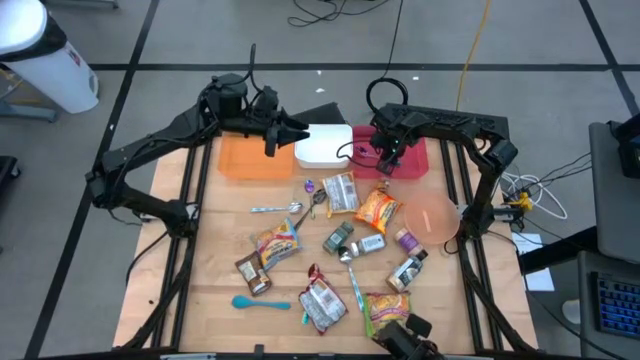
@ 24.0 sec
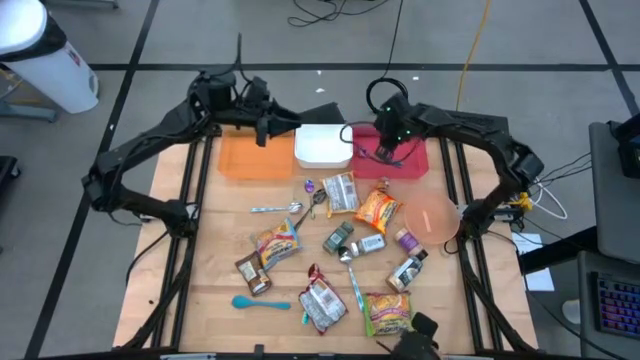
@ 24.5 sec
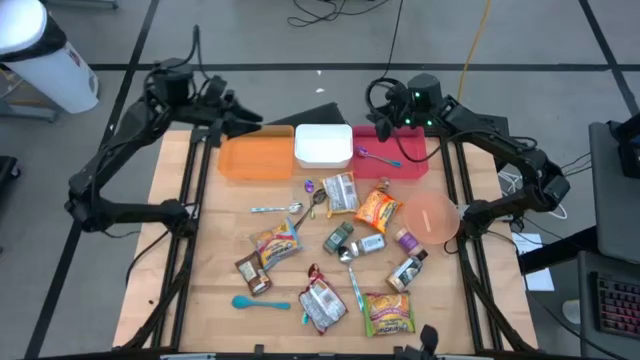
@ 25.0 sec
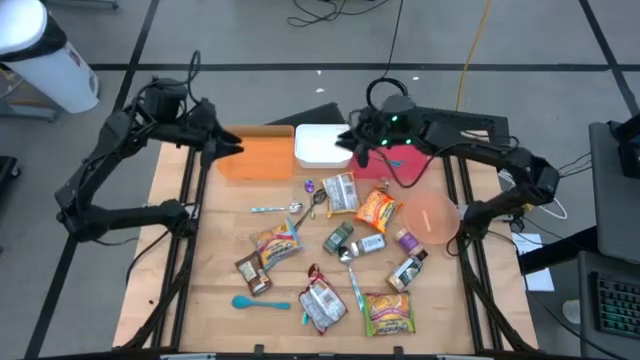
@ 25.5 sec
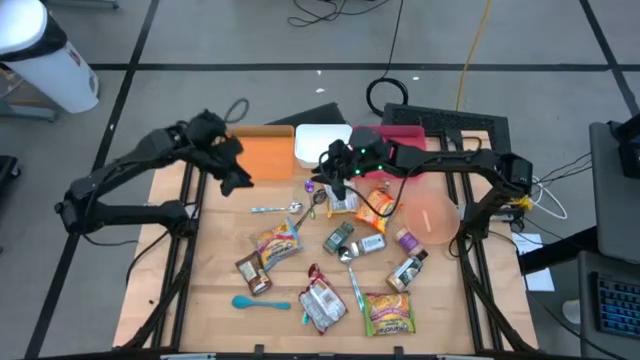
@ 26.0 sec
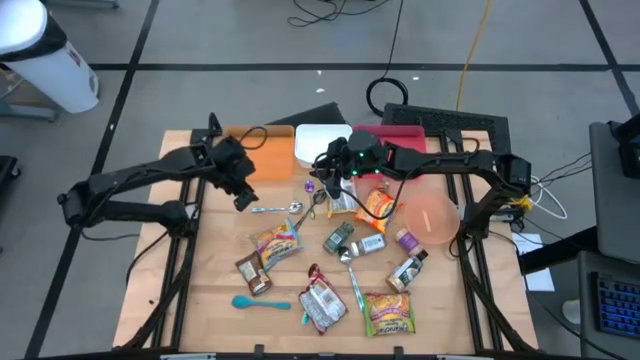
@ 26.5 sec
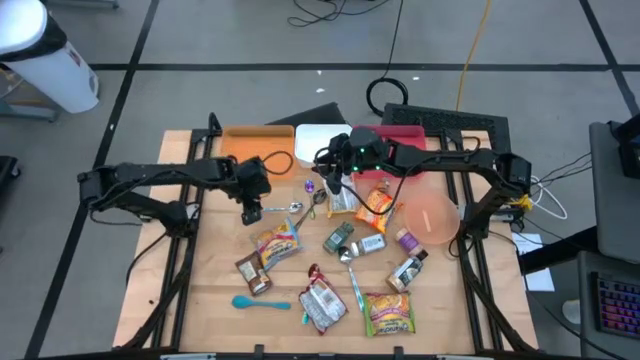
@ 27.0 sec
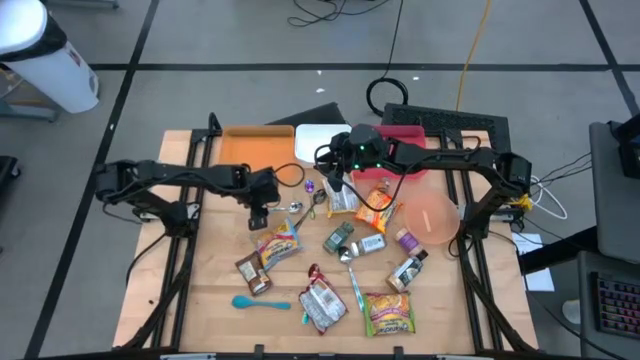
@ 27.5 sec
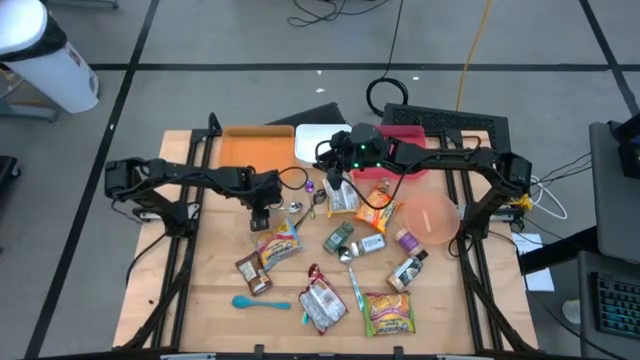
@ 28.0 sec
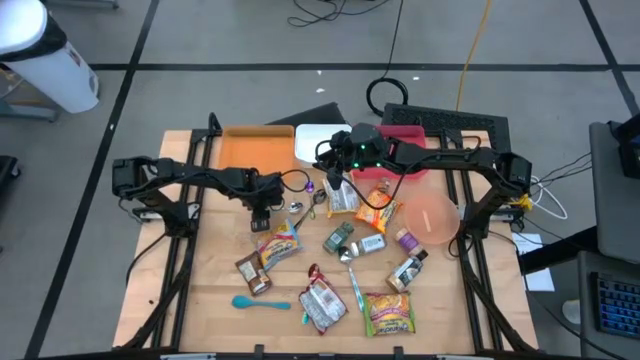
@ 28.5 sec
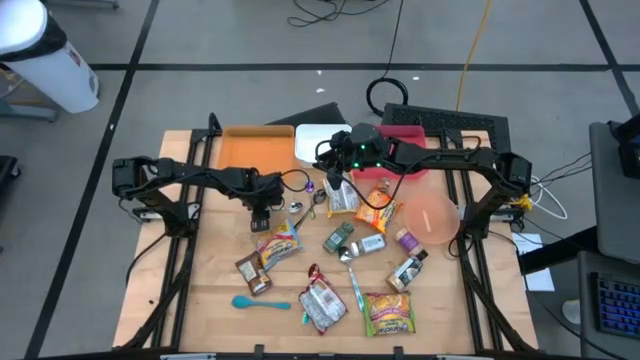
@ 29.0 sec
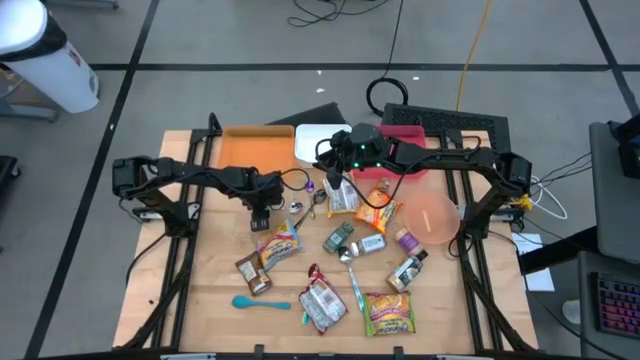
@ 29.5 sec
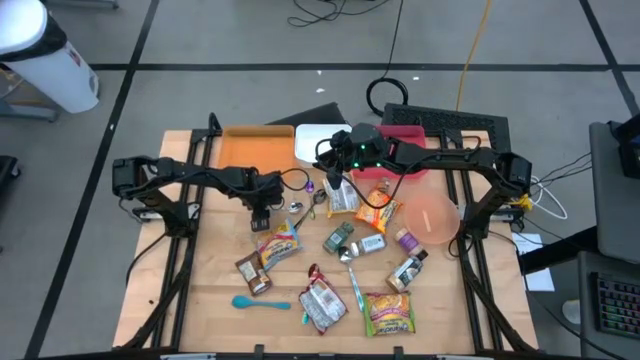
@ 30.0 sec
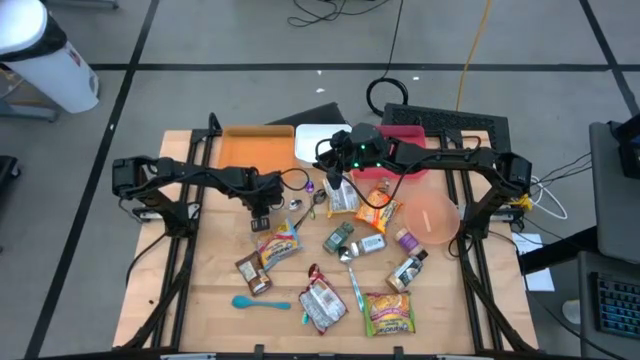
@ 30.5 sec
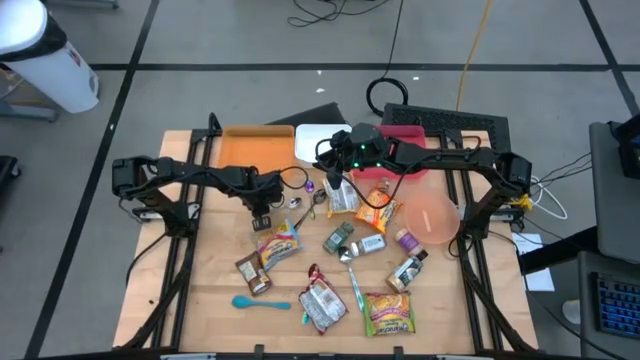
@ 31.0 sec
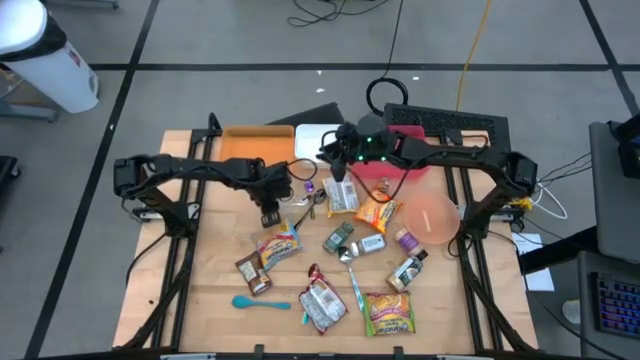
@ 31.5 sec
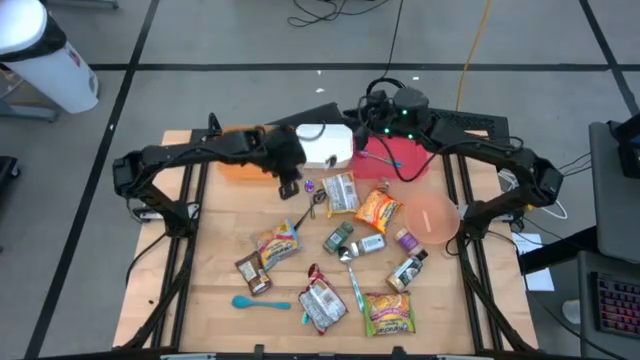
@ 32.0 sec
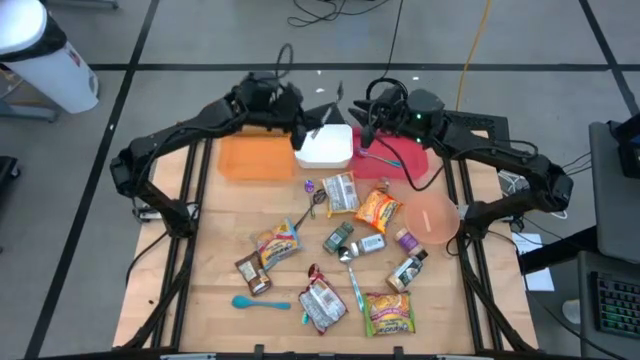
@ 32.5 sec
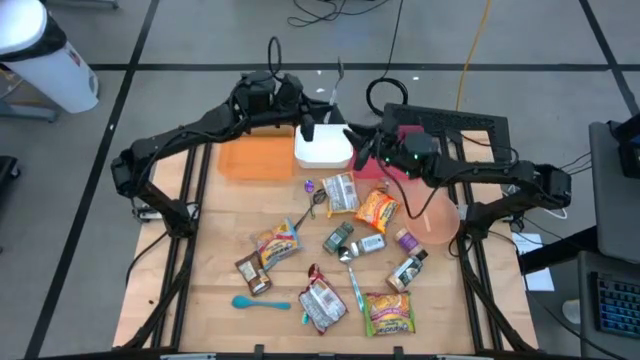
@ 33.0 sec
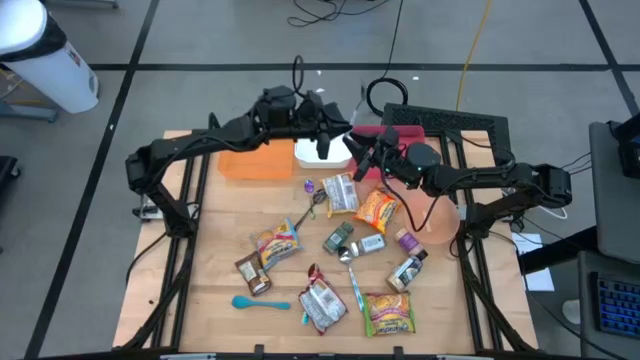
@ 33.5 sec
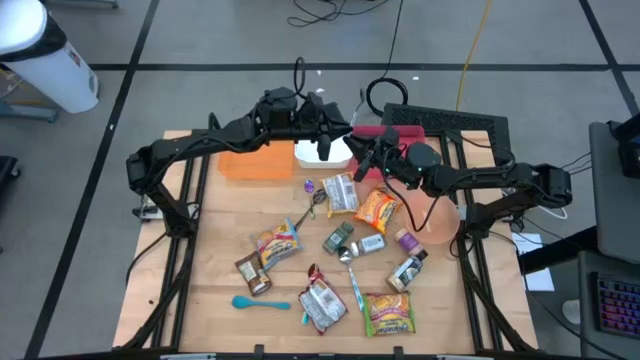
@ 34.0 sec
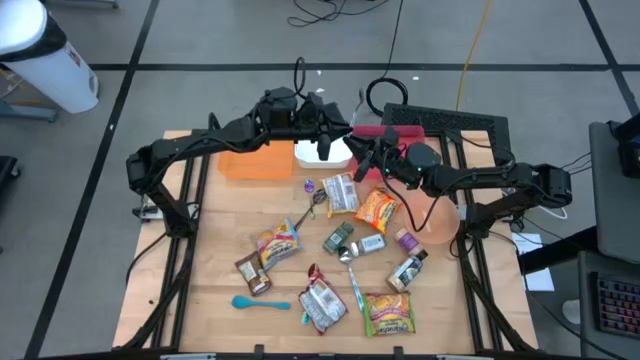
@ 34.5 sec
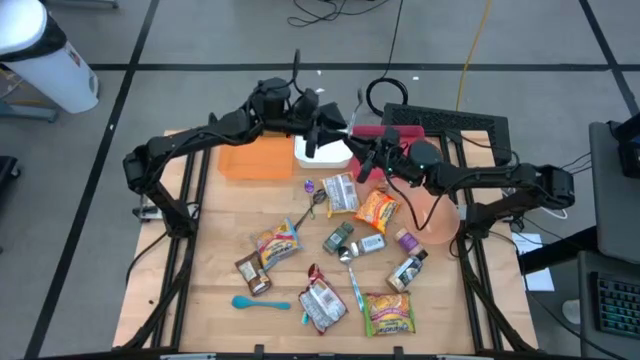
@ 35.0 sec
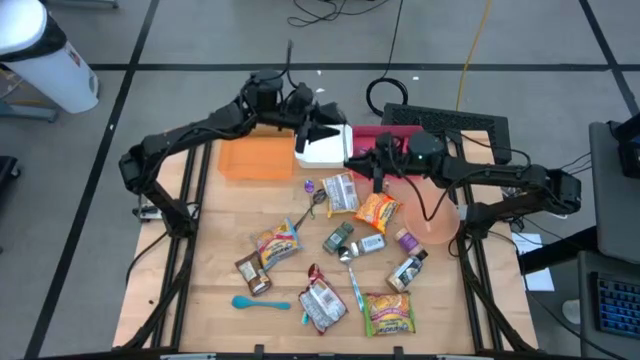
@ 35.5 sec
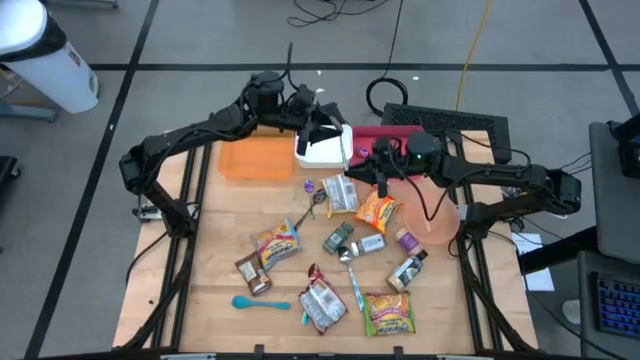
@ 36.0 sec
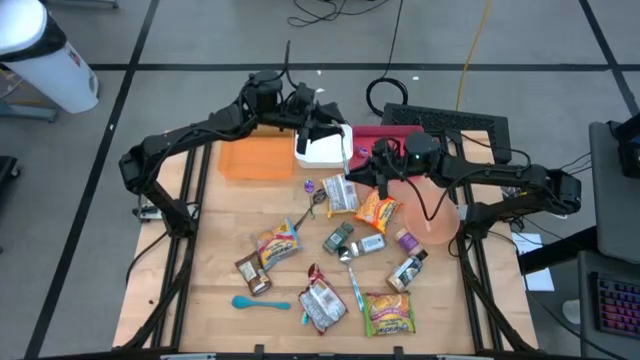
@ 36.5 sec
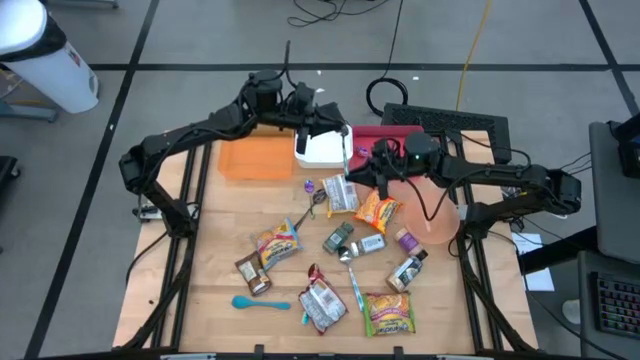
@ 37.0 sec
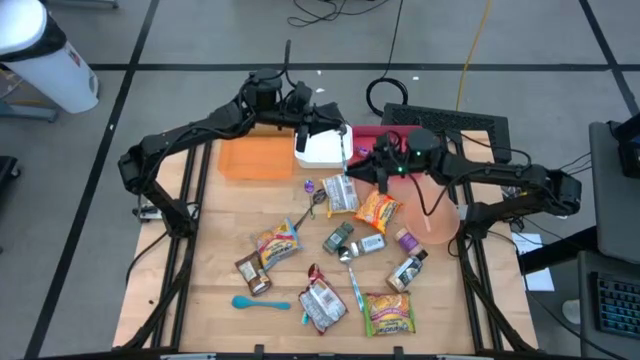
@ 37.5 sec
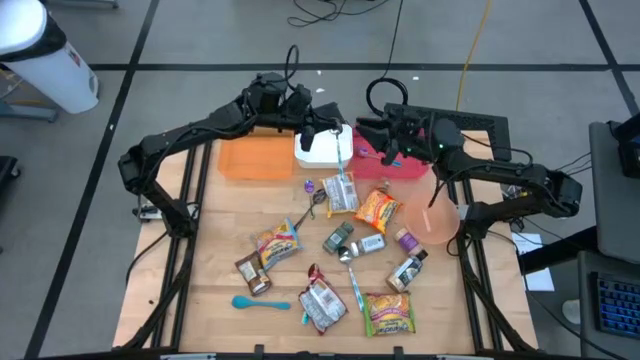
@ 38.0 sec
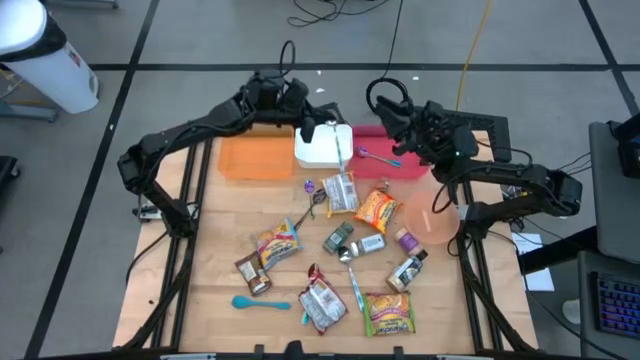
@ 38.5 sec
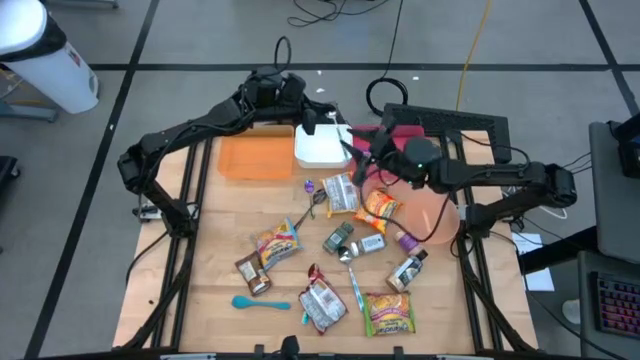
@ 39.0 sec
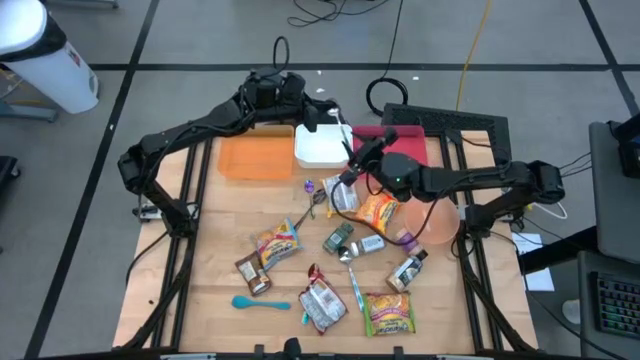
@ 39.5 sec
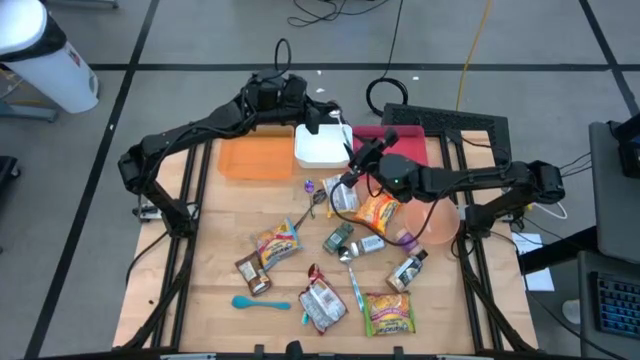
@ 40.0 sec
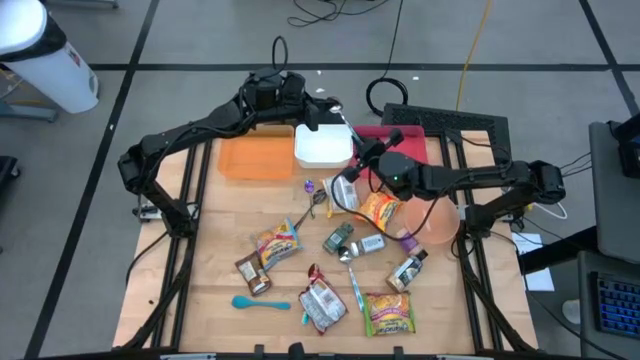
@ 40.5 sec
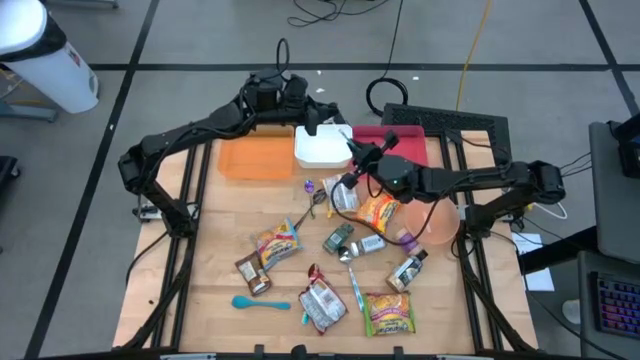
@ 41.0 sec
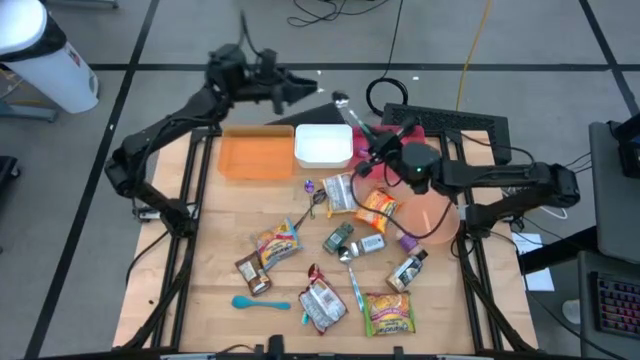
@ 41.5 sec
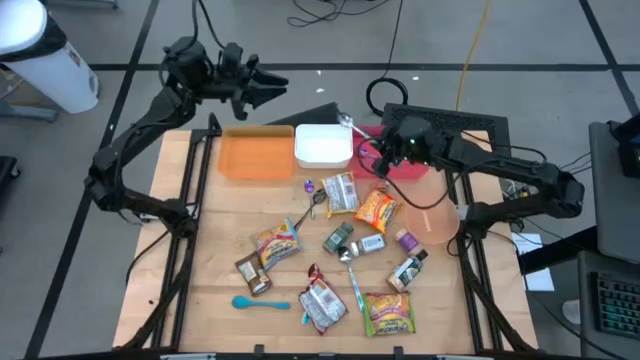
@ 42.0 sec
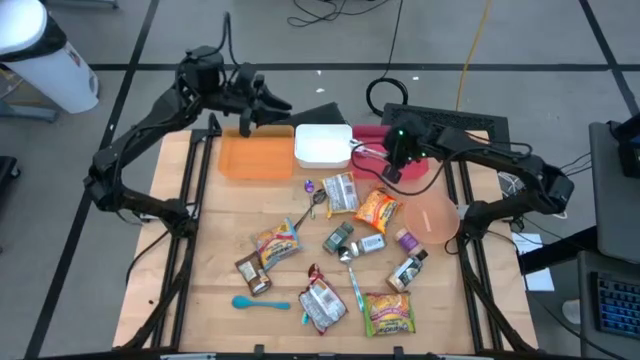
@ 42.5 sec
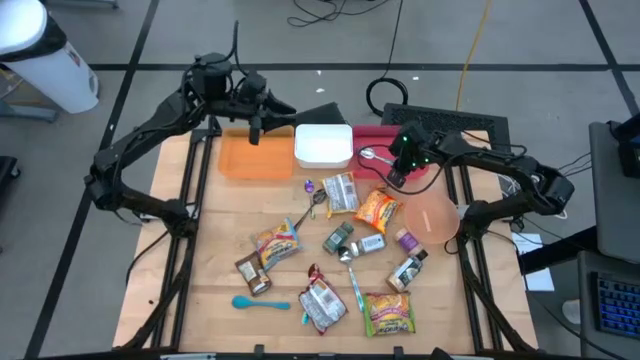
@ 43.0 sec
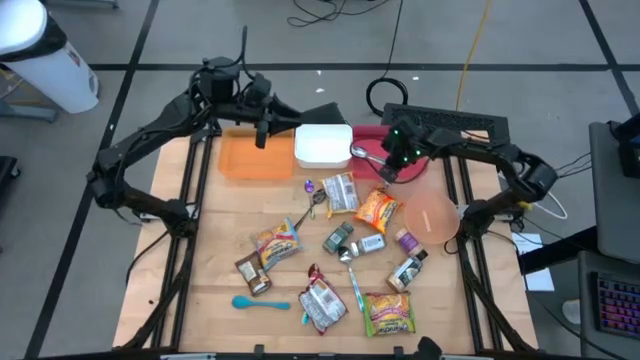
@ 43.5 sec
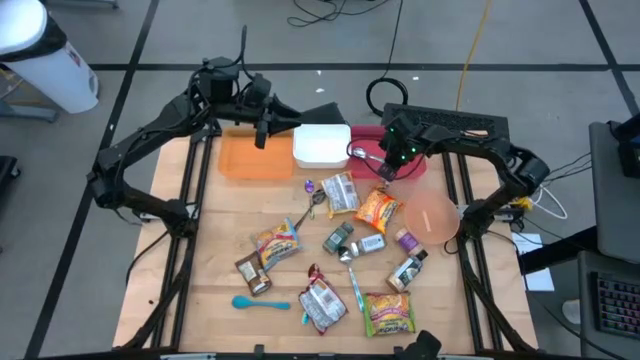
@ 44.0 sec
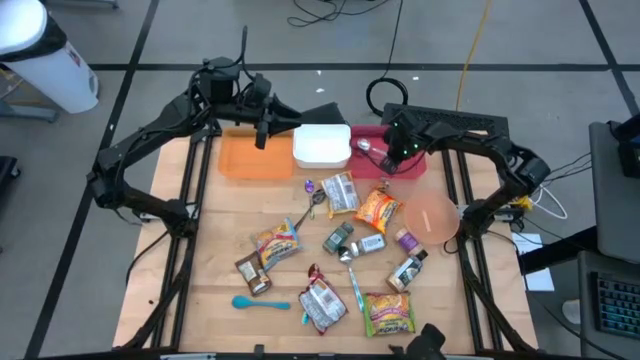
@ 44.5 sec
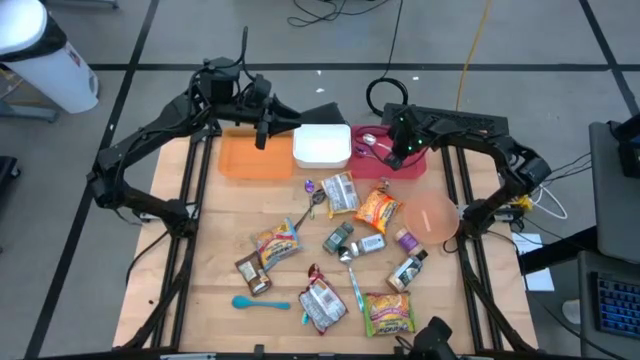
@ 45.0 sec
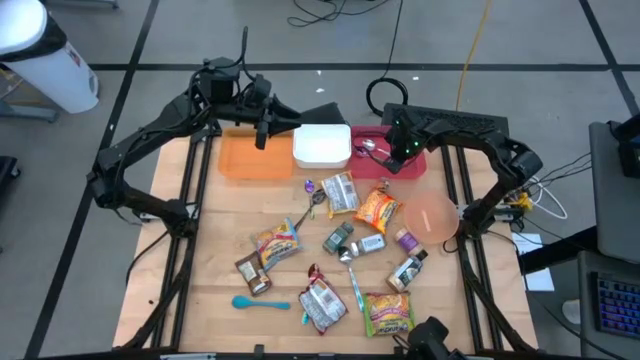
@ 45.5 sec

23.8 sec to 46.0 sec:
Task: Pick & Place Food Item
Put the white blue spoon into the red bin
